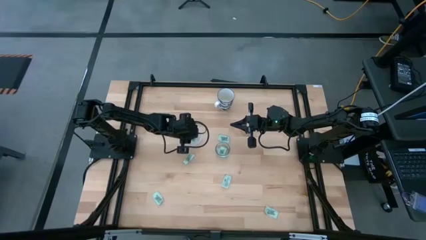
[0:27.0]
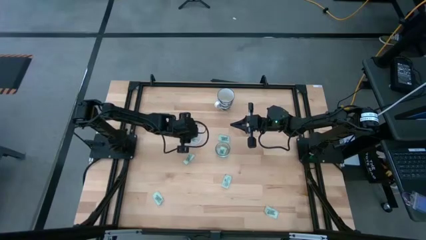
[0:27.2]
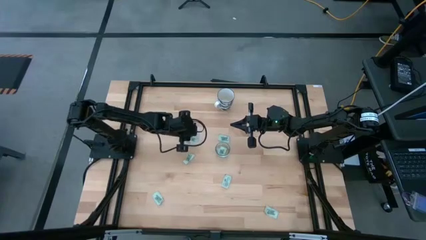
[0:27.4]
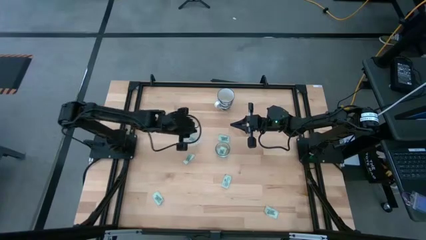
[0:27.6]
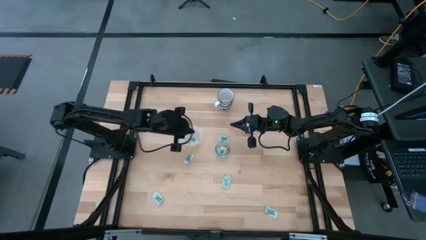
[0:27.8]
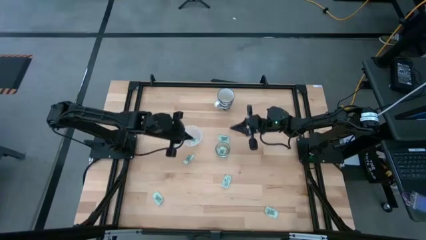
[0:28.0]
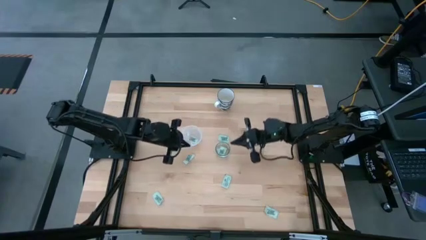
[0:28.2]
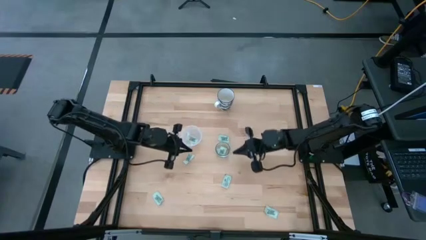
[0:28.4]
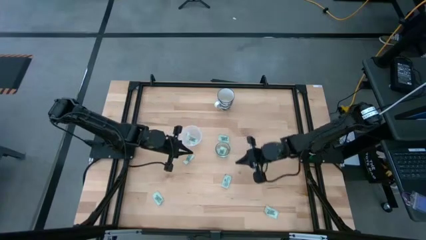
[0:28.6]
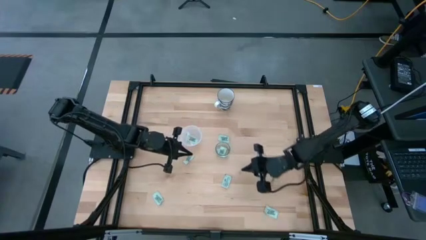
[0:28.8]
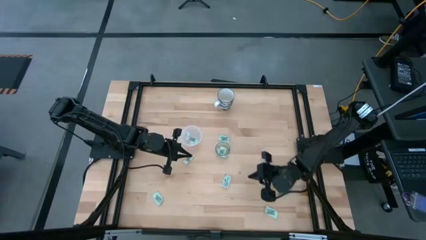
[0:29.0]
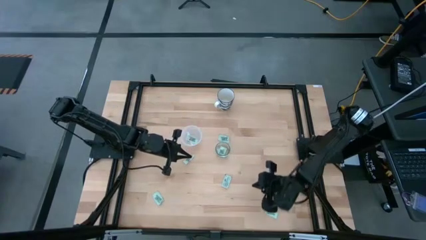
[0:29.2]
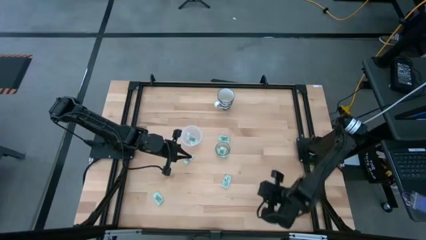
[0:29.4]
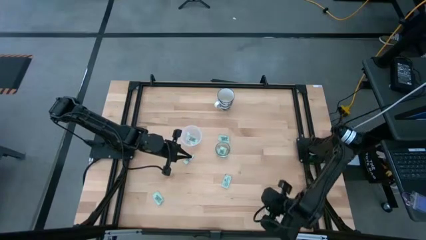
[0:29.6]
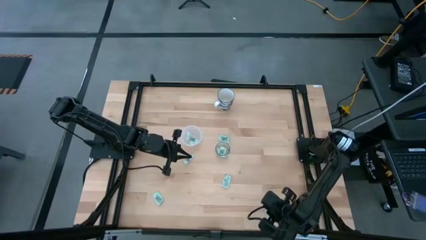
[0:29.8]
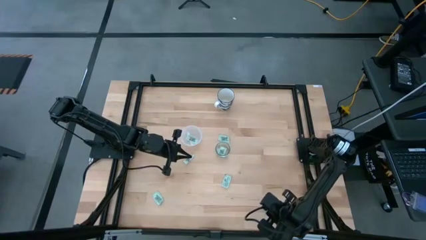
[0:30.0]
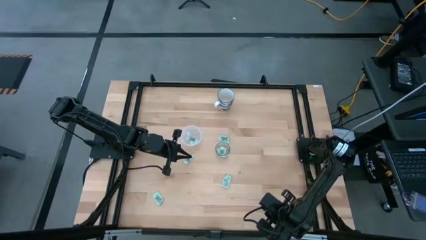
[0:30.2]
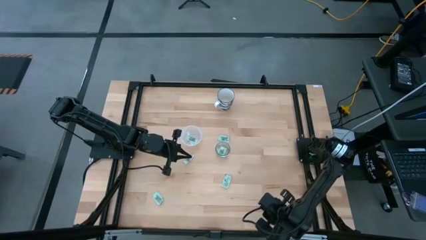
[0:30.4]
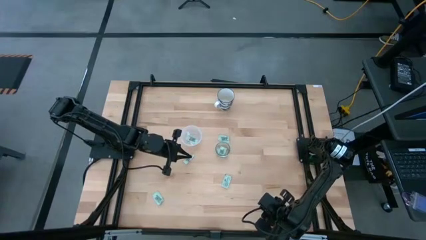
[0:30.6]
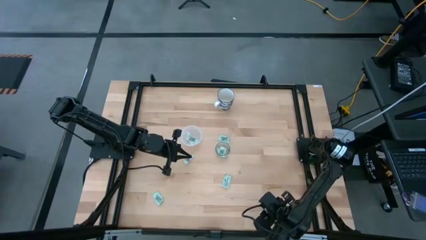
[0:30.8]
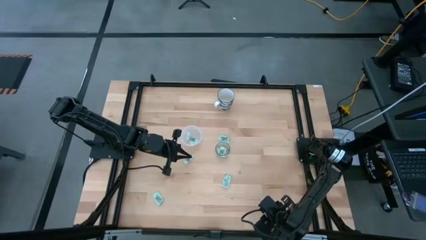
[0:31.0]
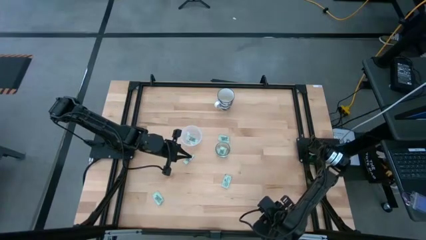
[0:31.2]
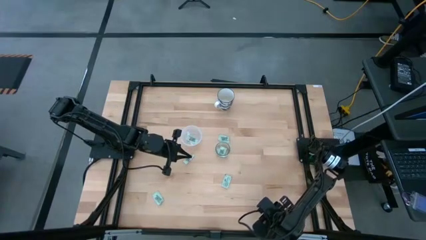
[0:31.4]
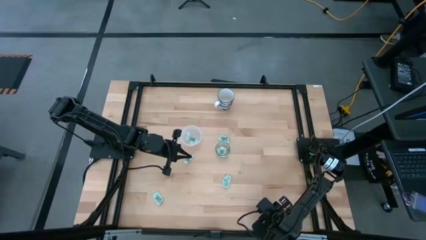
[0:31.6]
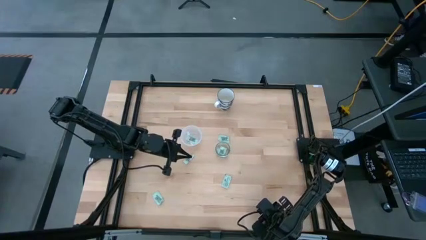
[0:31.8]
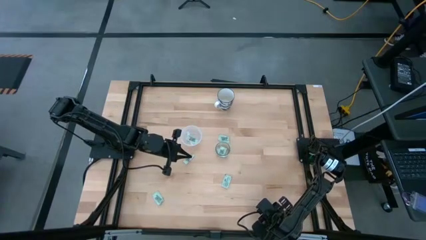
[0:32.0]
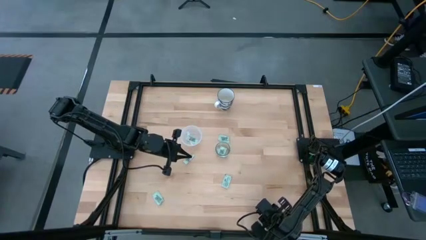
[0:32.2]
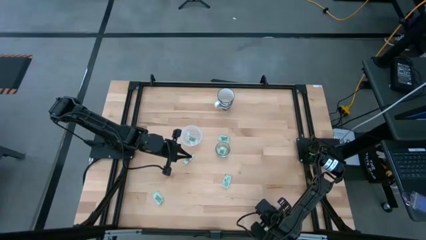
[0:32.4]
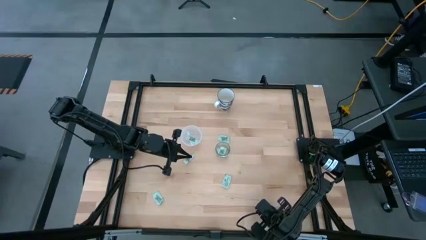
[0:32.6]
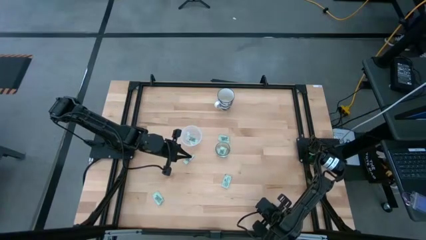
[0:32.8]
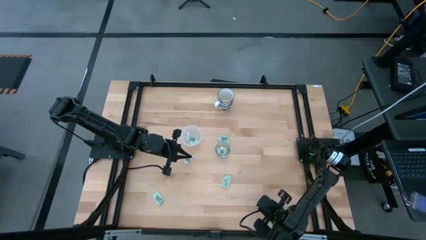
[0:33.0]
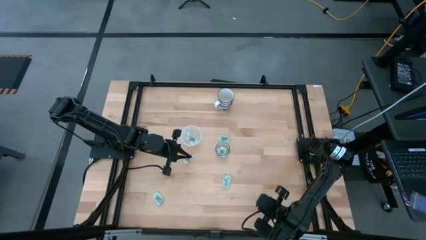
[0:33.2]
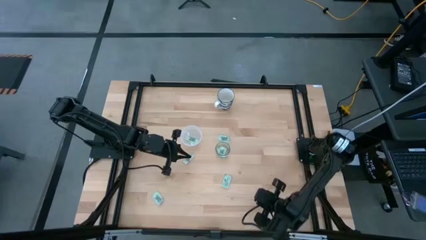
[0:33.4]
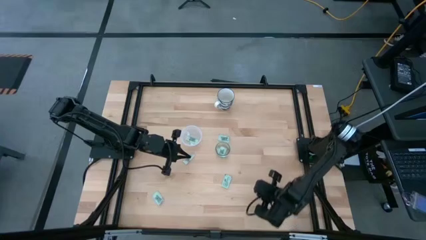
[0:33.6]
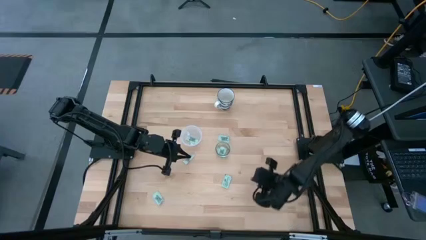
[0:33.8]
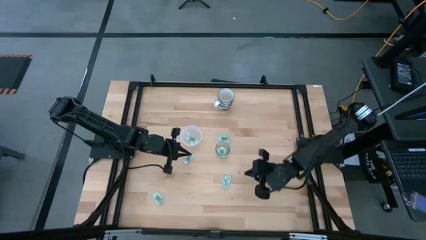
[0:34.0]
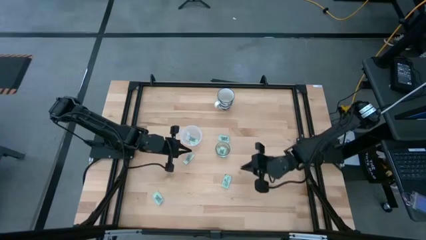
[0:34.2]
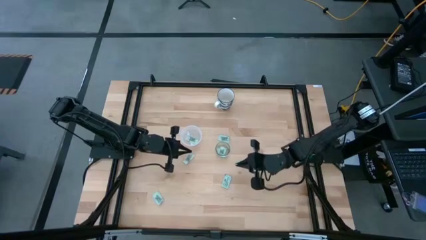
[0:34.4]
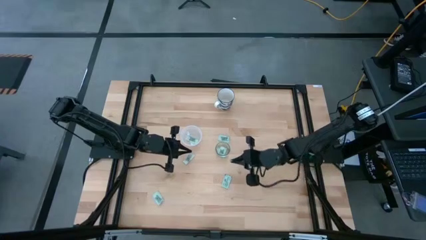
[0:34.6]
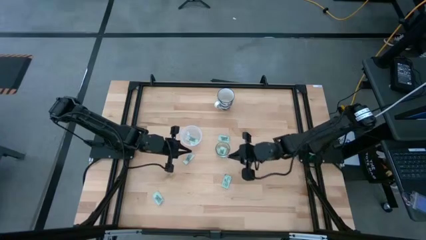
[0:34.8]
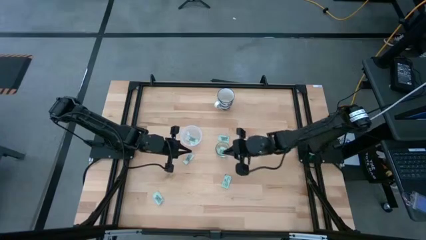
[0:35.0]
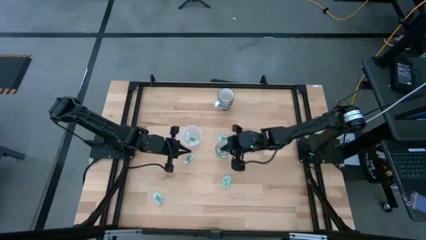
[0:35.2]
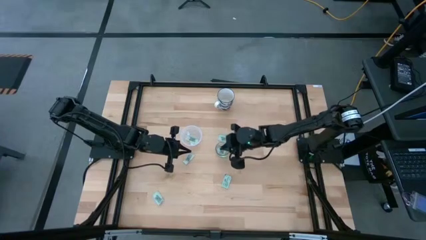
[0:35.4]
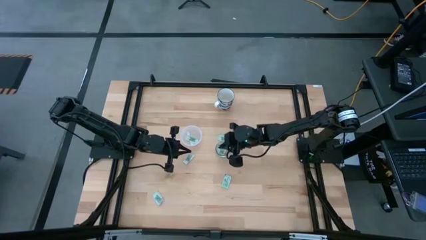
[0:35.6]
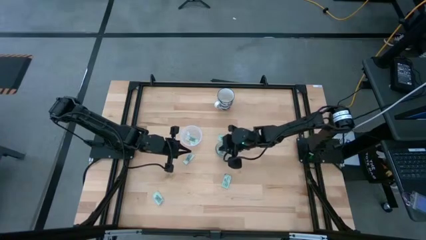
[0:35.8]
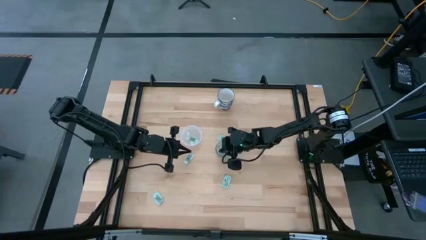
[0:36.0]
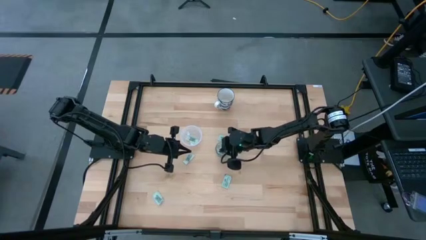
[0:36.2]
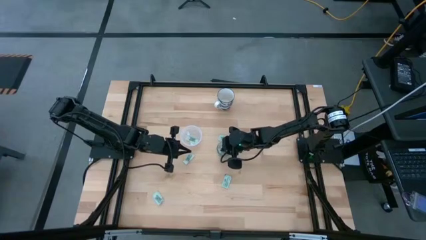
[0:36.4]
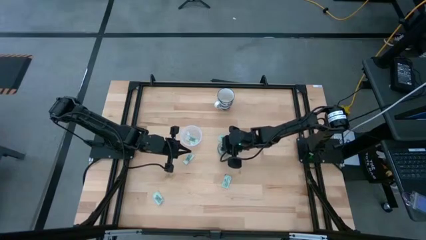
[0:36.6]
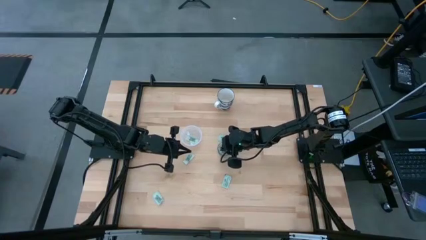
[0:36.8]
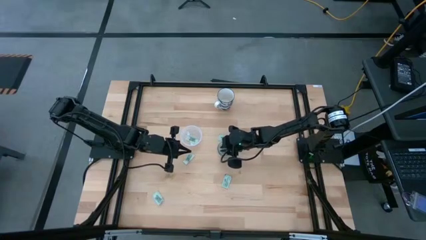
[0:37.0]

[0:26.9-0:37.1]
Task: Pick and place Stevia / Truvia into bins
Put the stevia packet into the transparent container

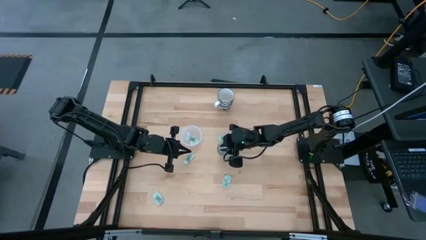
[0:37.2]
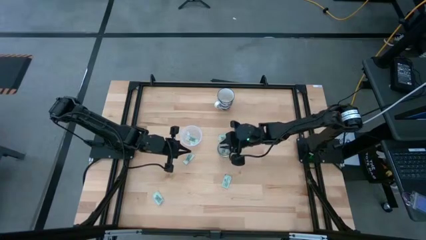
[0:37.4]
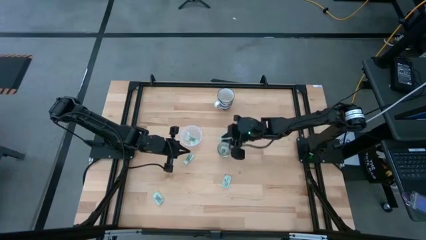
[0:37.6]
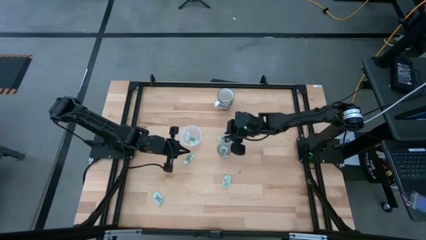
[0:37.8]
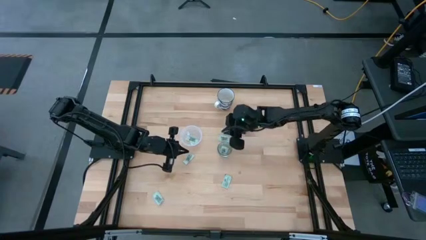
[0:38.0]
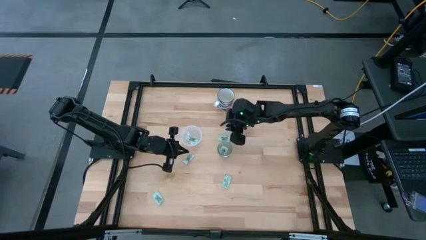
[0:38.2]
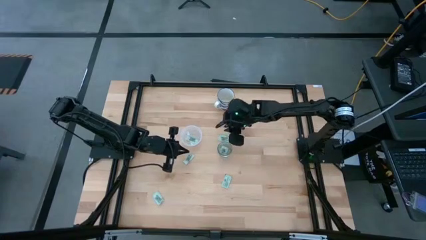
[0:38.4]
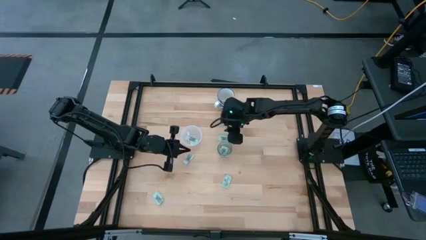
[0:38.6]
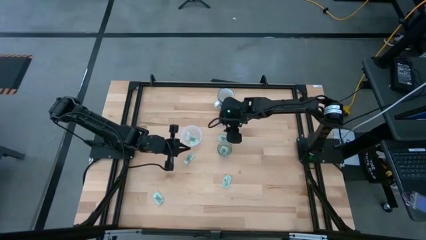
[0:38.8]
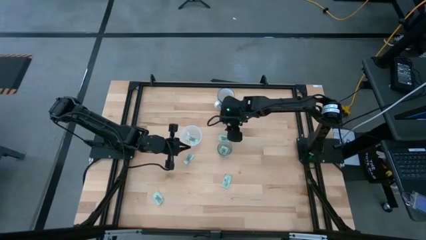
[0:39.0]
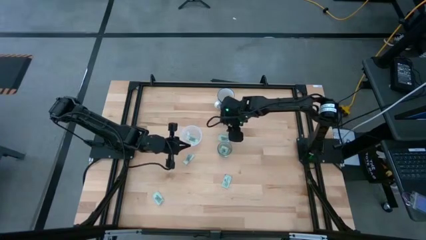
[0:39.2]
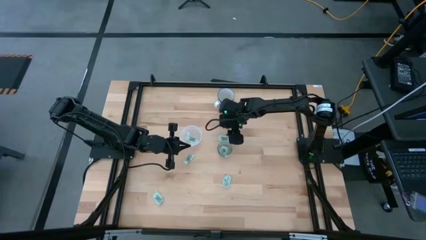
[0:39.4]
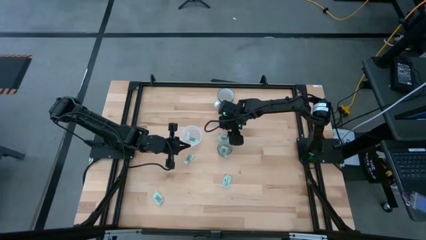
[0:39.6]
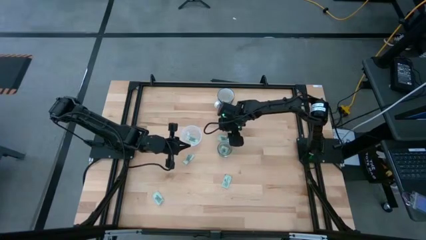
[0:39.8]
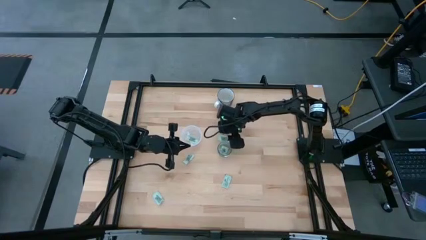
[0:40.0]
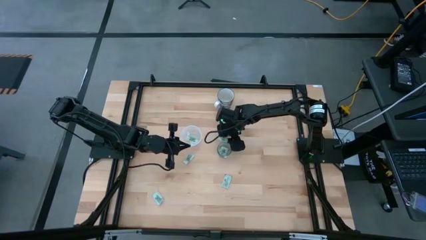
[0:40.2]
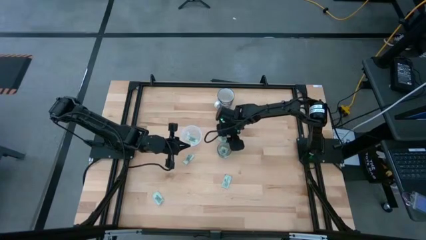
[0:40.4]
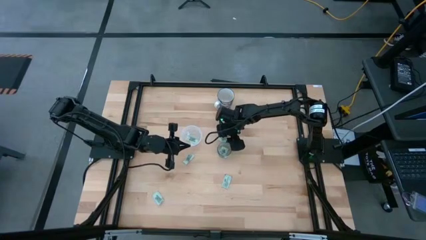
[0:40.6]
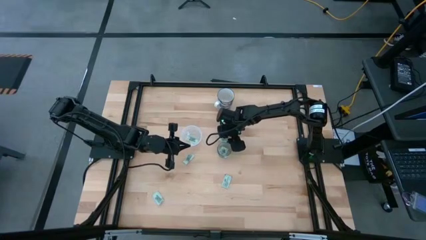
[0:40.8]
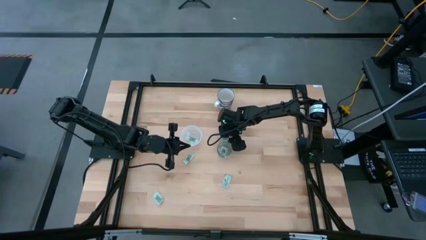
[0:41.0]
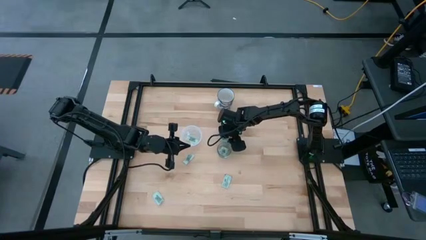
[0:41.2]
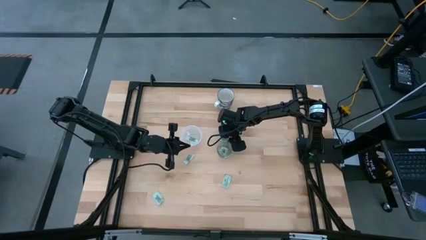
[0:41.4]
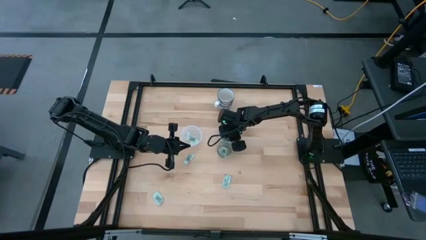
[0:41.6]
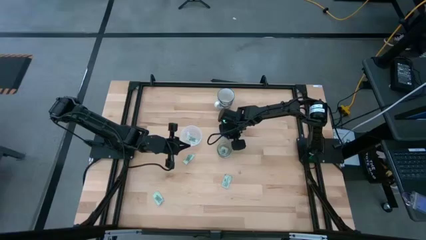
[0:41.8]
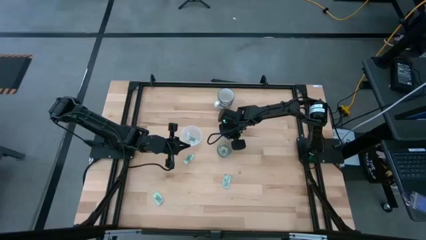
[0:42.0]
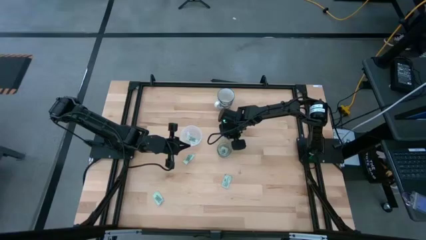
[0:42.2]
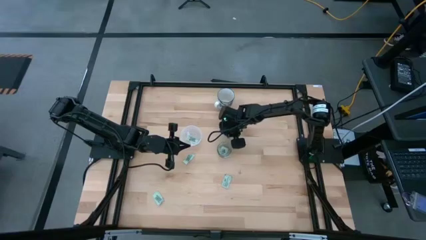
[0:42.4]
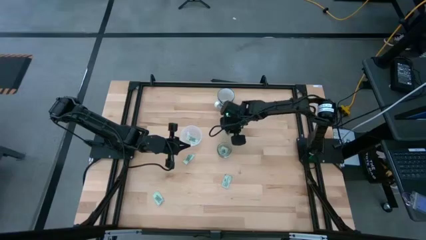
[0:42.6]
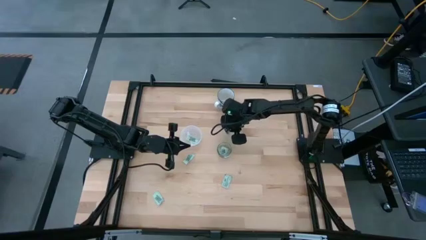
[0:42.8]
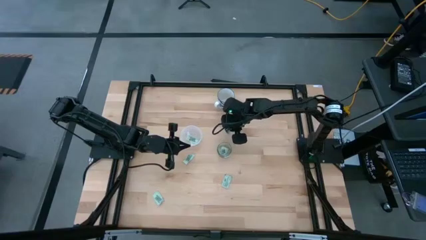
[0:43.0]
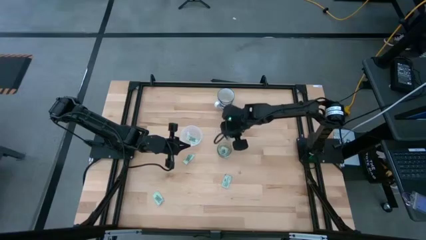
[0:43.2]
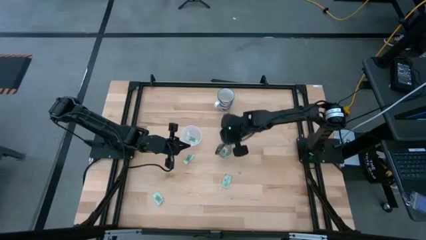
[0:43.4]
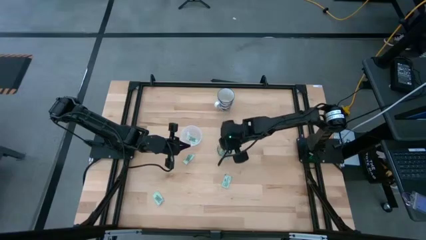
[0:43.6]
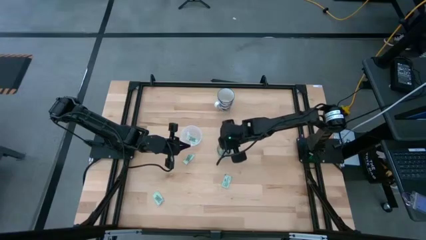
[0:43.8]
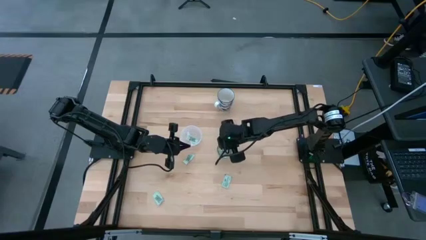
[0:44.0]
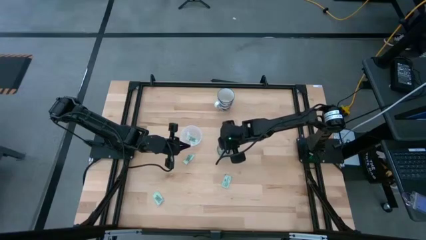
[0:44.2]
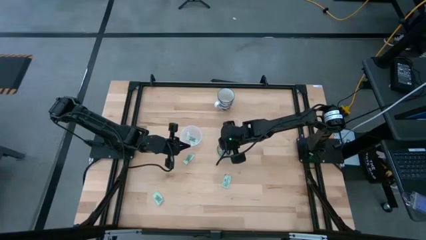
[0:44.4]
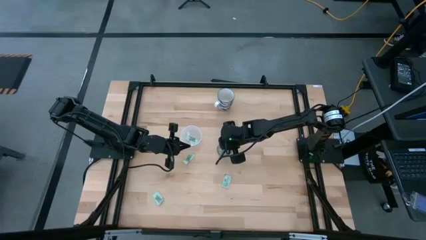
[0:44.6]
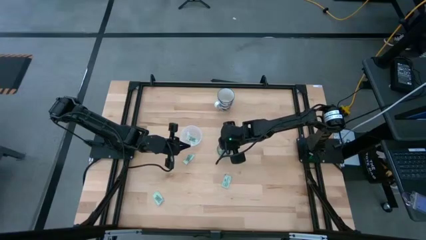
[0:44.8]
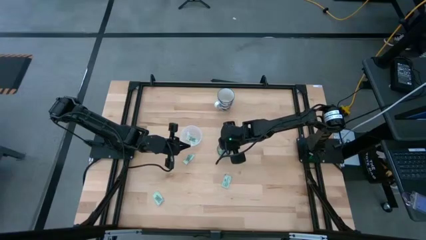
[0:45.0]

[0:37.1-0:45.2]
Put the stevia packet into the transparent container
